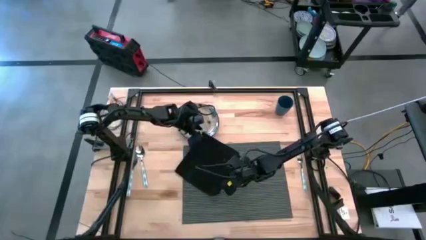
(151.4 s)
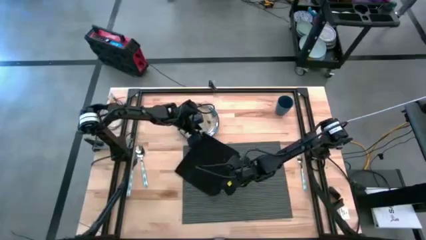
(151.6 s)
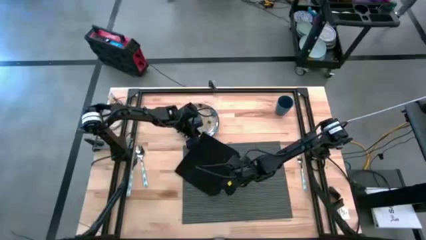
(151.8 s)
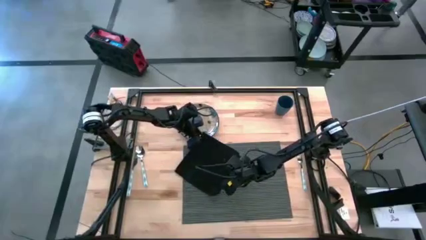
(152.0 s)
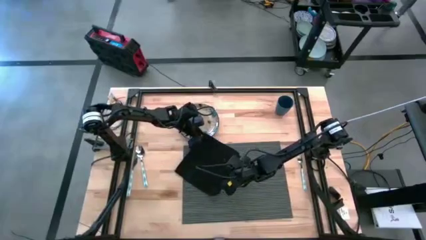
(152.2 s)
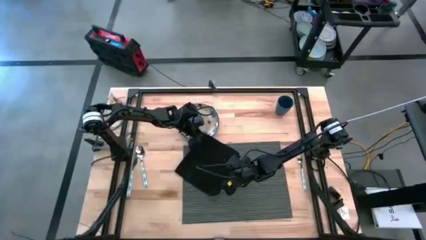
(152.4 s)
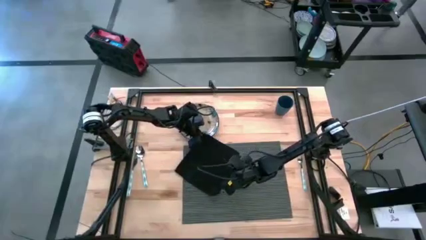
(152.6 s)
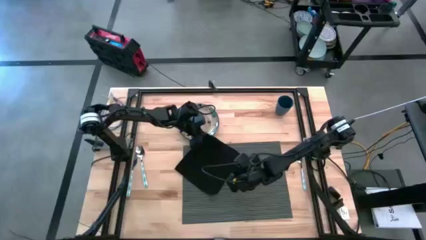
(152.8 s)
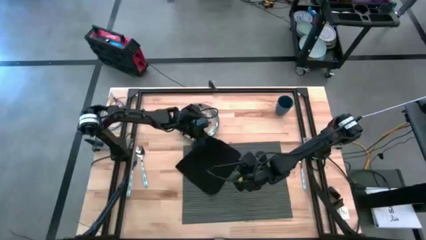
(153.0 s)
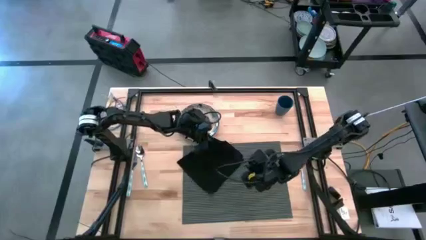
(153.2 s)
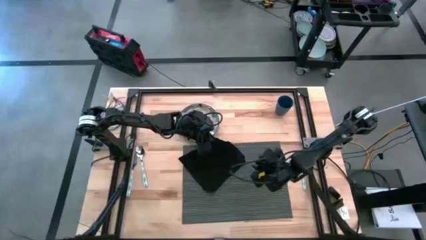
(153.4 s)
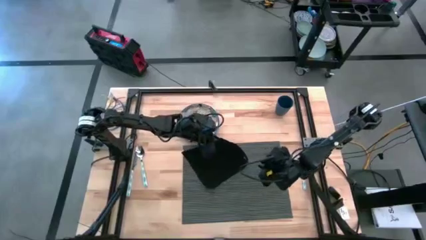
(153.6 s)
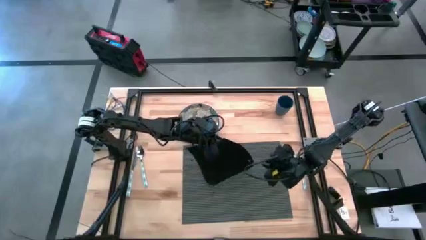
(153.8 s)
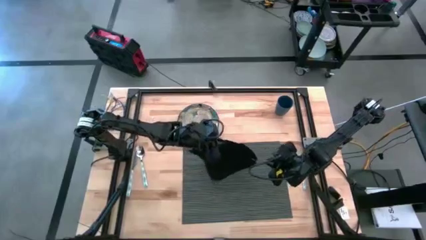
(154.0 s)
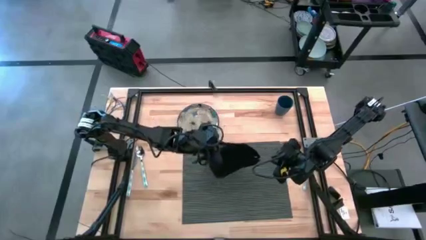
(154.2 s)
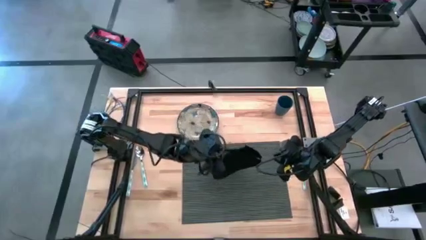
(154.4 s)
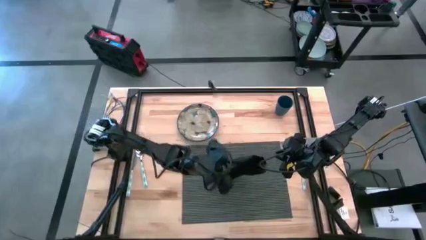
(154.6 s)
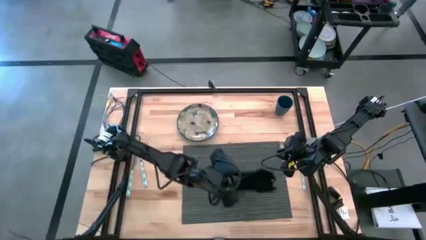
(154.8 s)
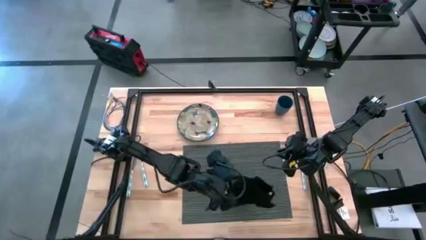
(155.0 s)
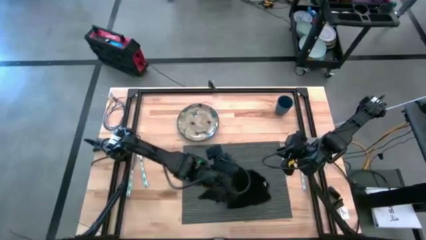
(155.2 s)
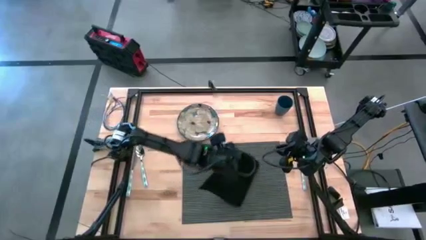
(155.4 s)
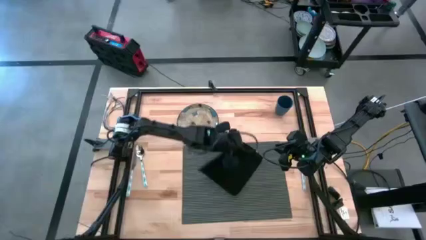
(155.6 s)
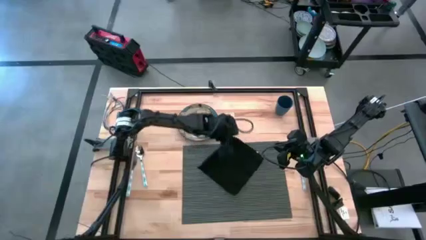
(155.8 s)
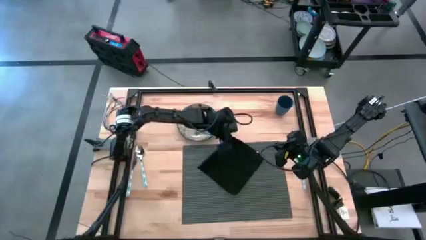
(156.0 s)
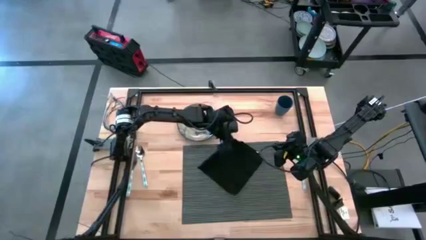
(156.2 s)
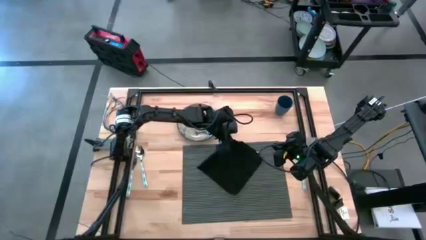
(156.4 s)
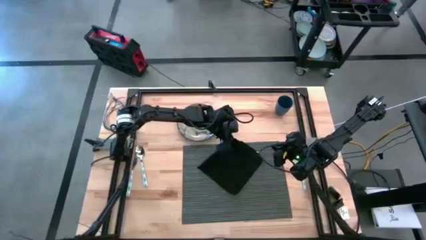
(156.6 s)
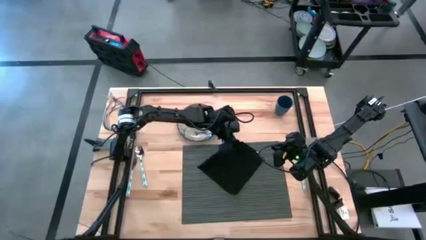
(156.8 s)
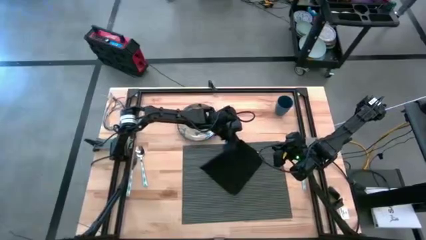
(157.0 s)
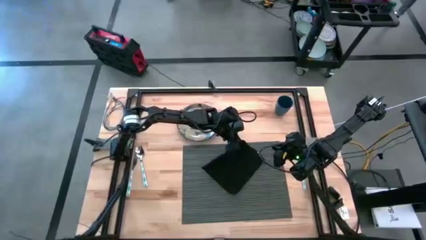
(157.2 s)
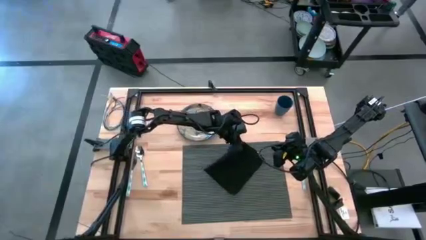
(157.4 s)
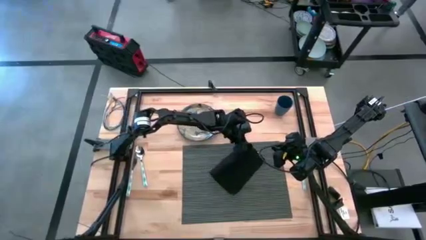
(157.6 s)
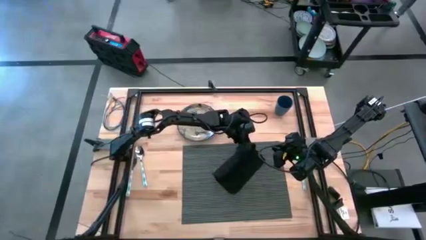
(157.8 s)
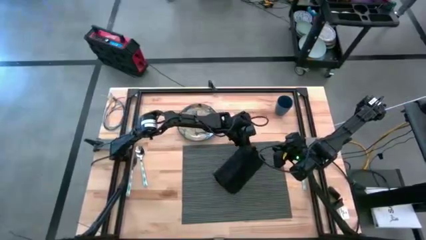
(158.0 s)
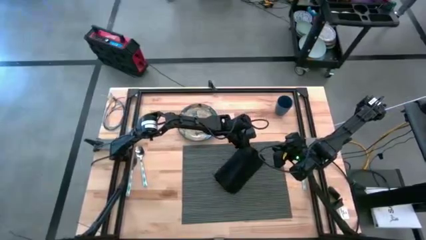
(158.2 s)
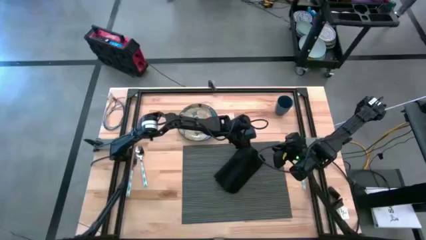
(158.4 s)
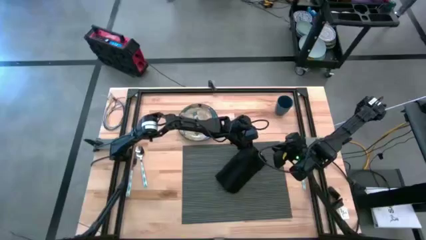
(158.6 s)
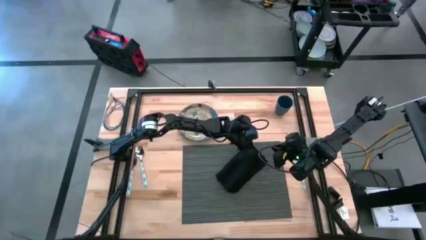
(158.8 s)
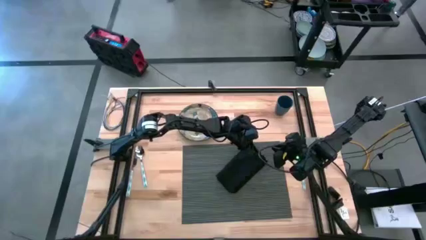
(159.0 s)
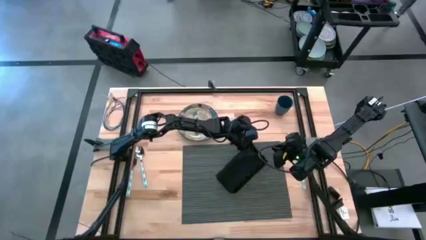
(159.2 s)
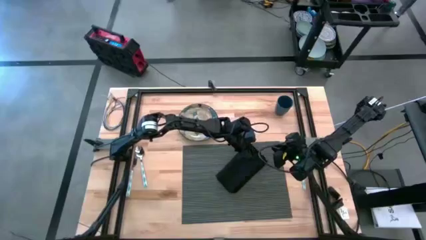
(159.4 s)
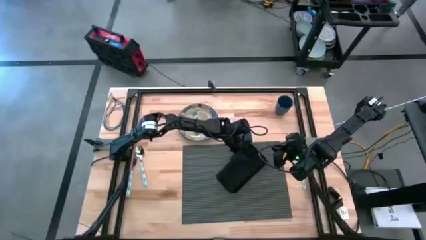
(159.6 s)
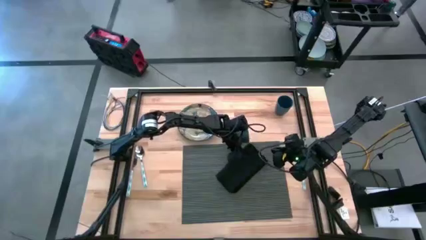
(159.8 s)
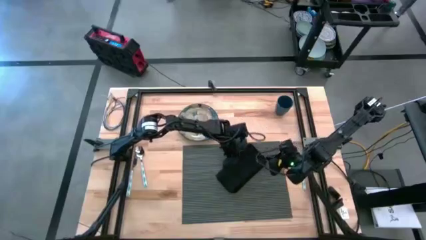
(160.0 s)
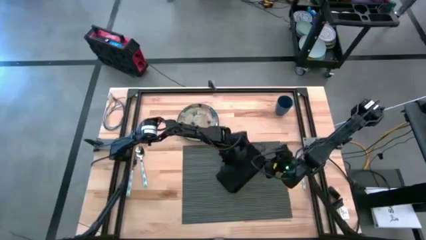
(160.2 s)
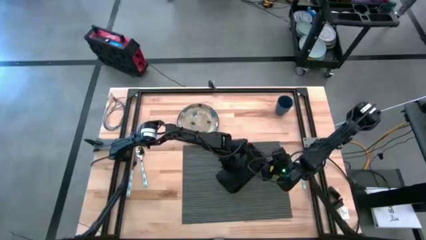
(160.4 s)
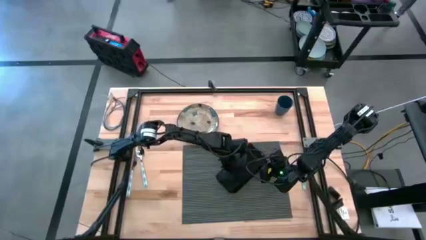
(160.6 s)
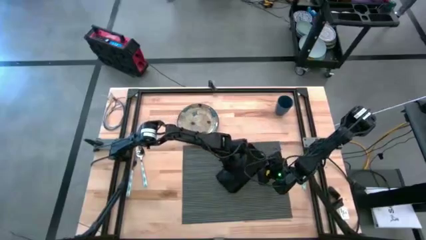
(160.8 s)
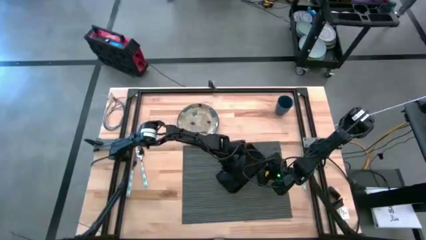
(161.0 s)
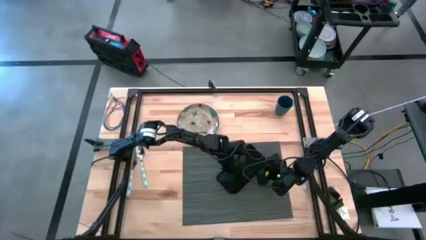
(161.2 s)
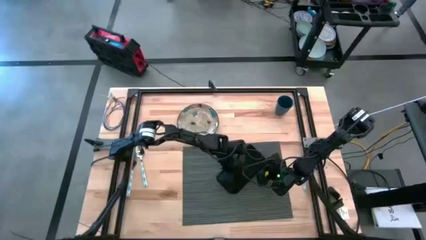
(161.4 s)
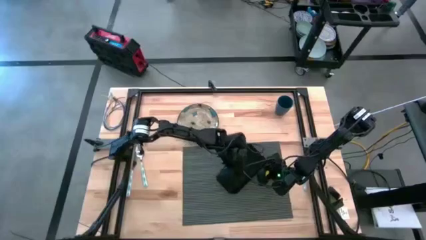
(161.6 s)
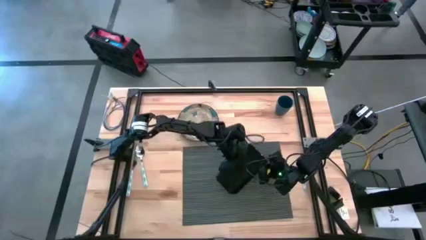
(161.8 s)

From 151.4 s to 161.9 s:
Task: Set table place
Fold the black napkin

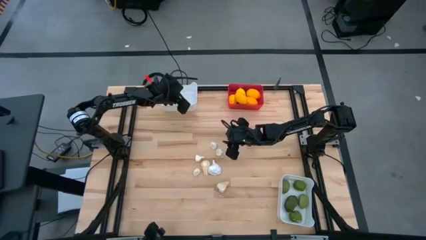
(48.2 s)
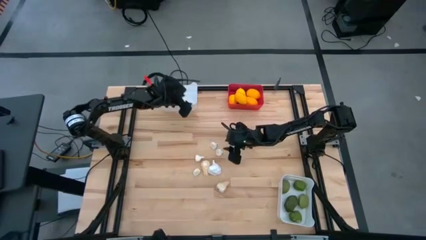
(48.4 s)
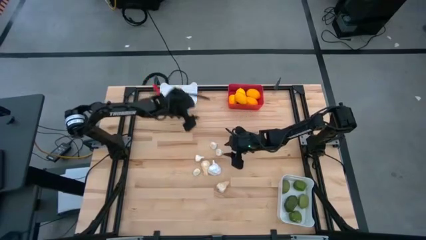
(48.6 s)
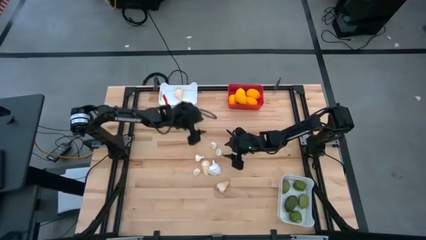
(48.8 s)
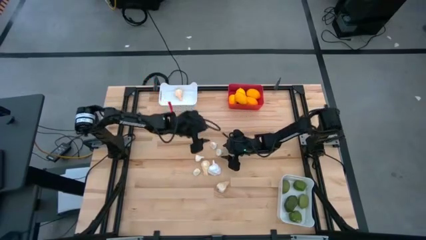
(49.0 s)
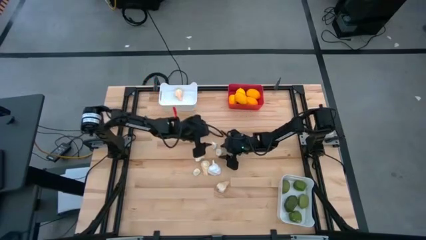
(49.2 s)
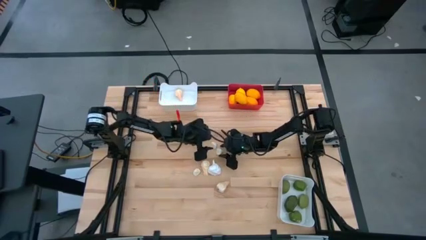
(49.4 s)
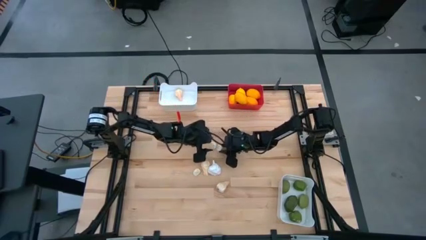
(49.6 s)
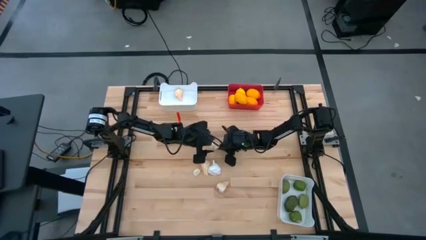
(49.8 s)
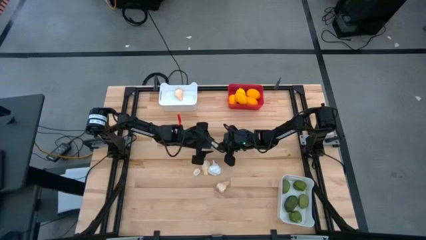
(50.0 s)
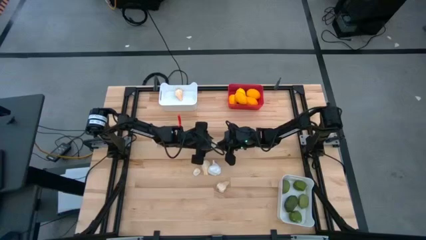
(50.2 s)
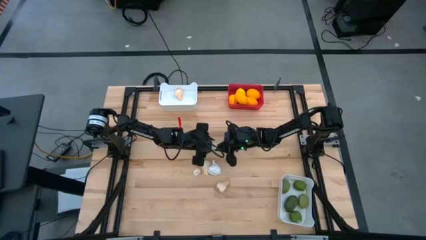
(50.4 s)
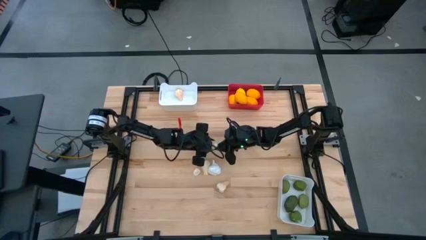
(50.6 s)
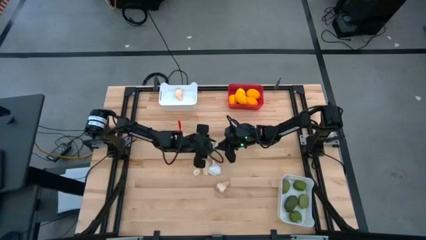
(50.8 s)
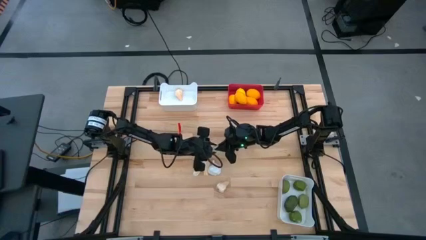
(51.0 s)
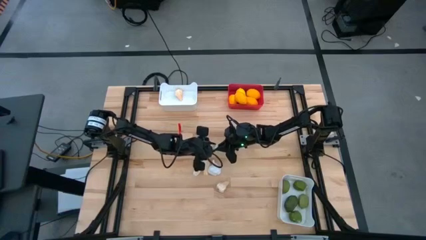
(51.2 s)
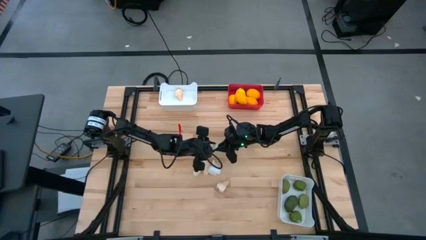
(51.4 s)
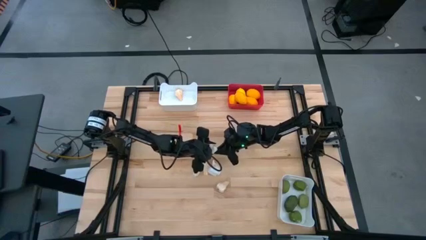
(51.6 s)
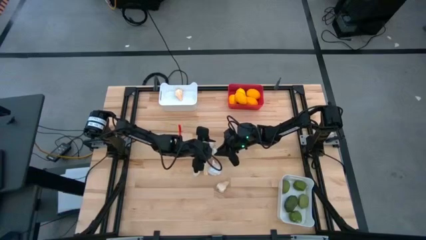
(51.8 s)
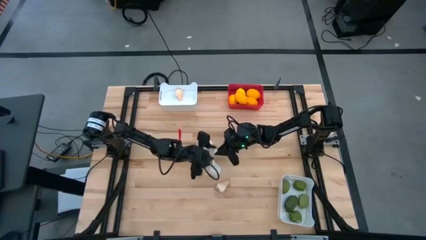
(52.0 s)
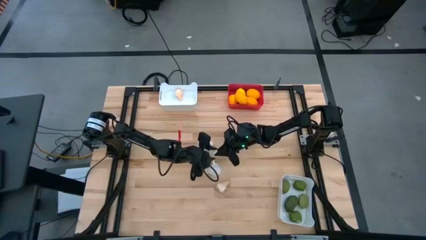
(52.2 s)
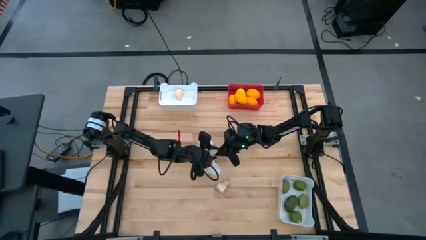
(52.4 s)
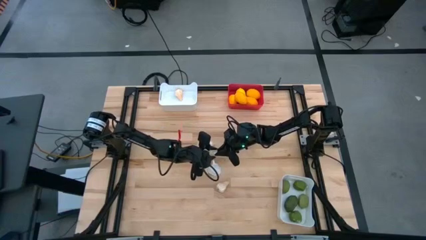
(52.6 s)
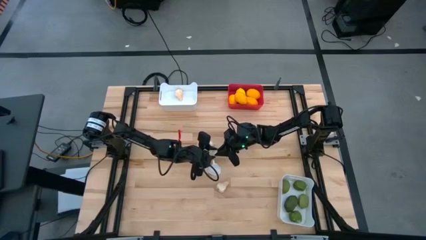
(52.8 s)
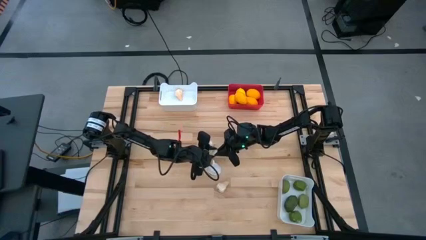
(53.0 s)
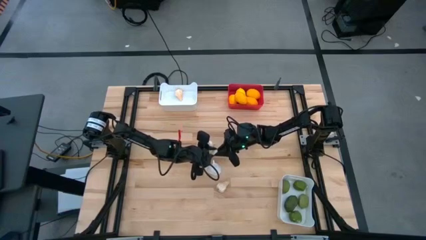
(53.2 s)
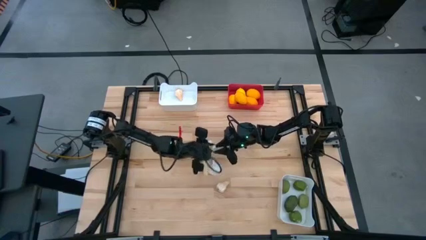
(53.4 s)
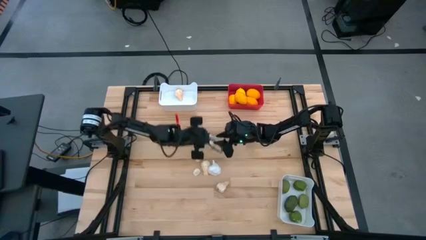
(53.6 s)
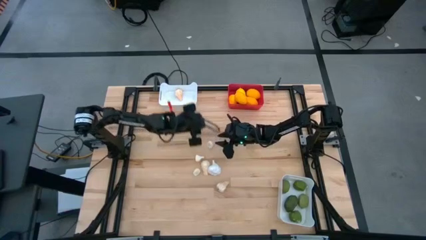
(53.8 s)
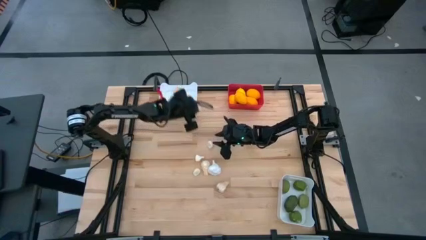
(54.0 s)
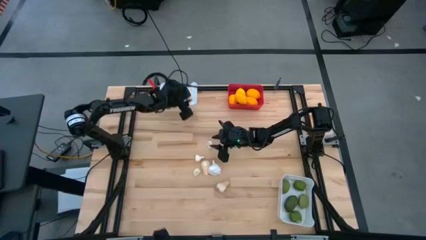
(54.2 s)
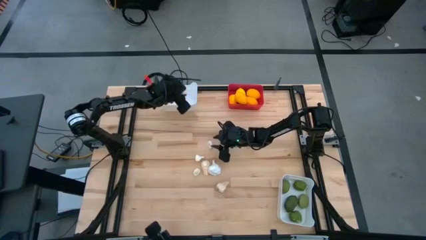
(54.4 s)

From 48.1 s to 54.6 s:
Task: Sort produce into baskets
Put the white garlic into the top white bin
